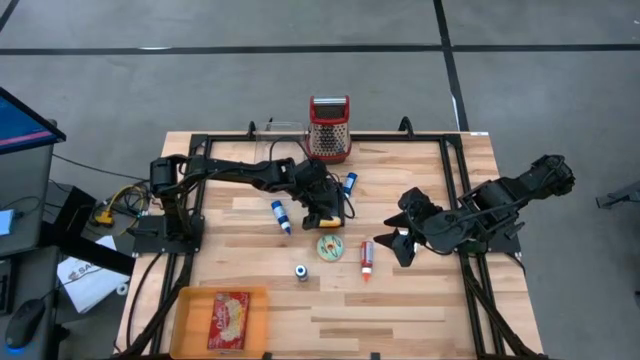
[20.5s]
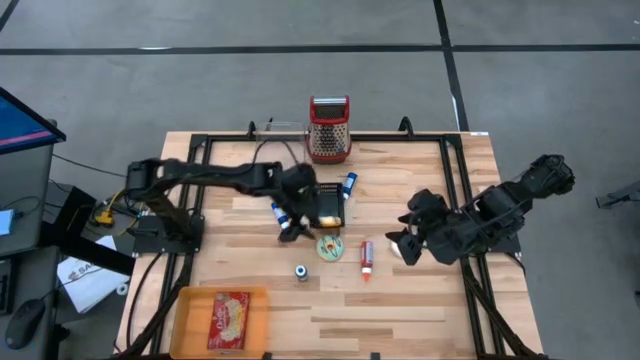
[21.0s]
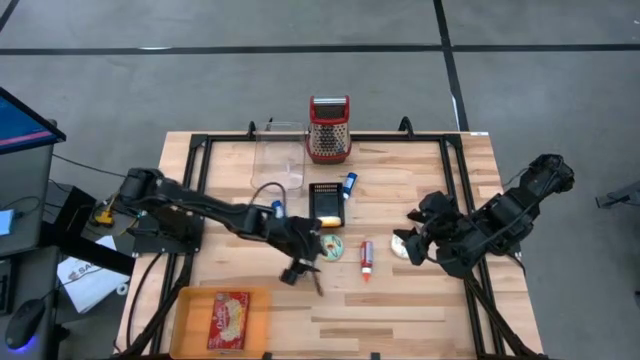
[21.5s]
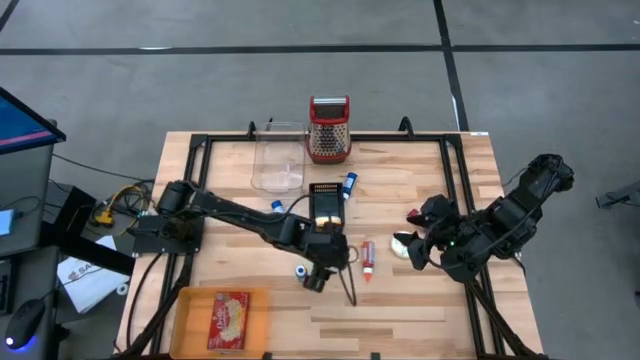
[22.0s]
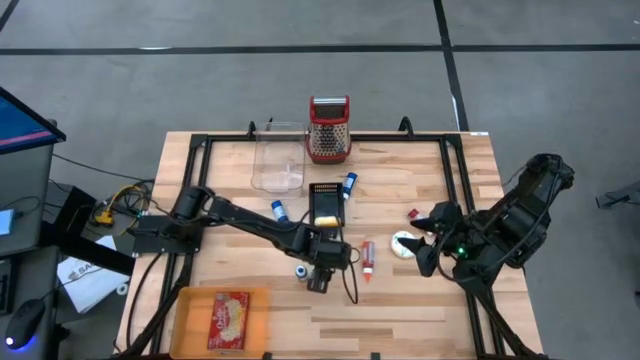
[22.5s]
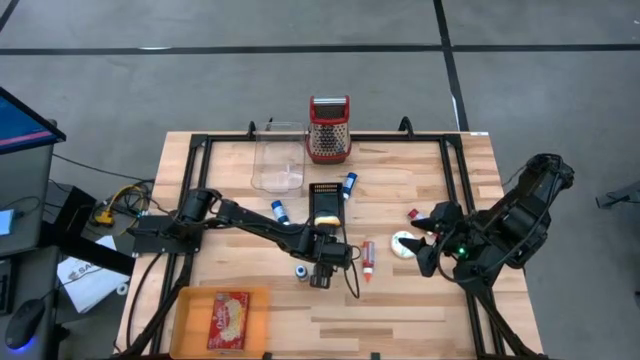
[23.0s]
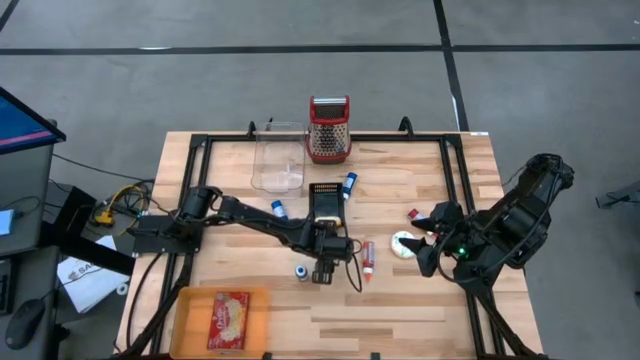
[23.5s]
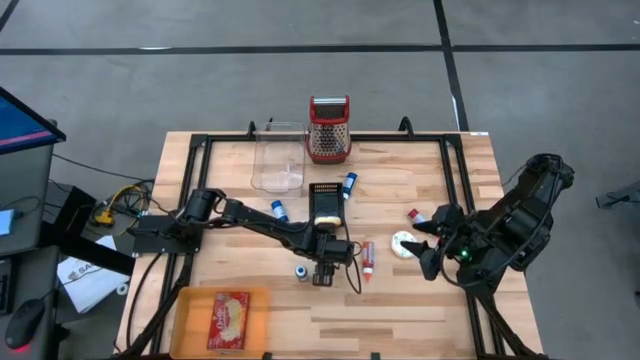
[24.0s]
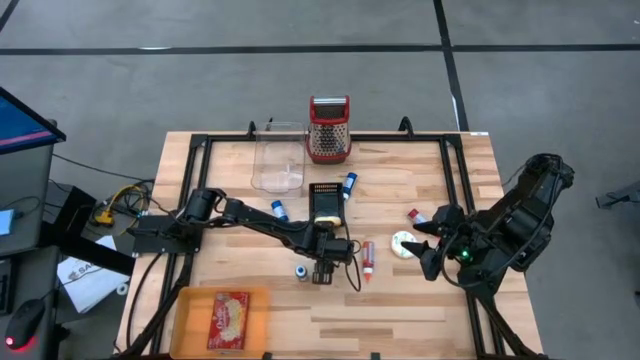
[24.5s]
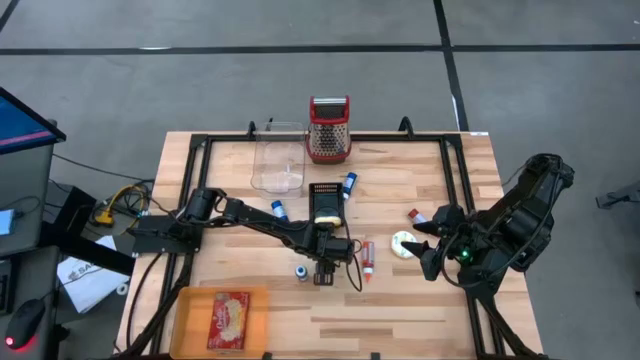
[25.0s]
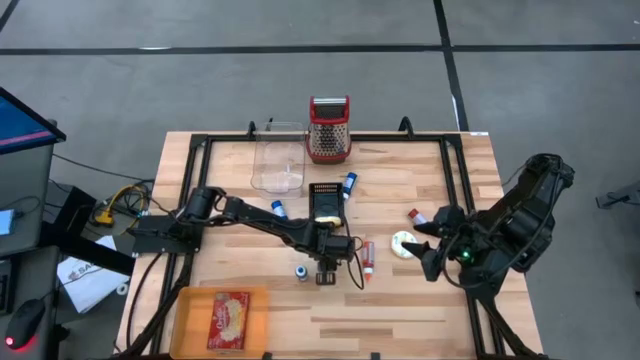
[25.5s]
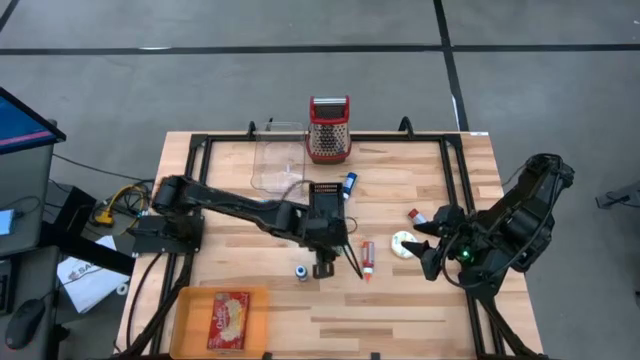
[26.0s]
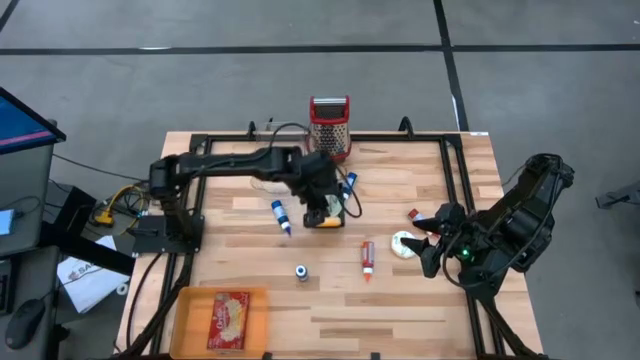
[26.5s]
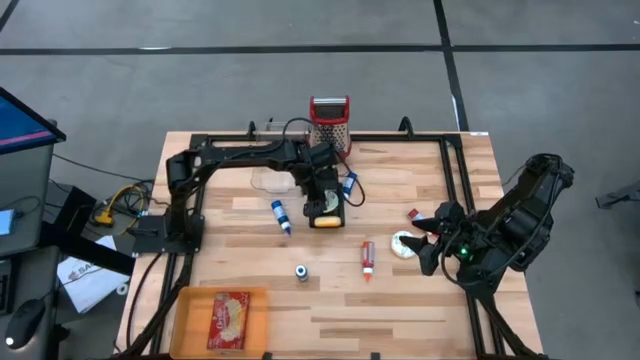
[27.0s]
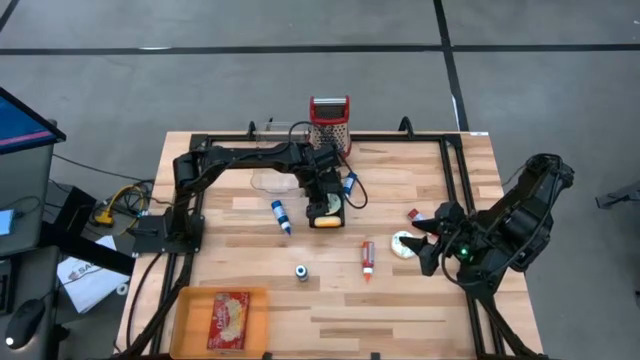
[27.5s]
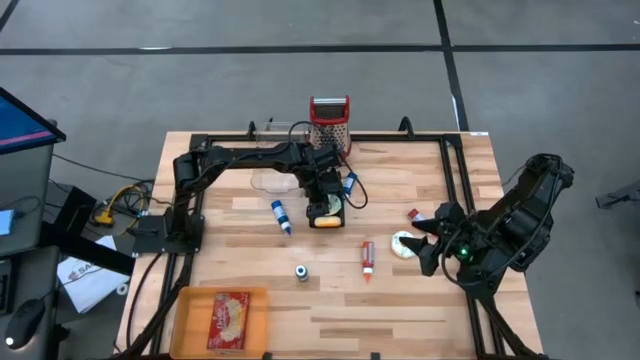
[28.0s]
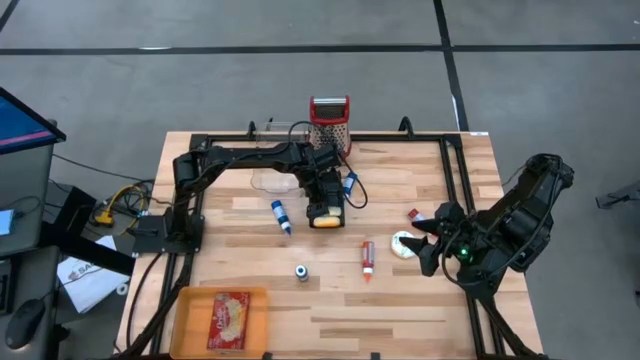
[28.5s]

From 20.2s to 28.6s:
Put the green donut into the black bin

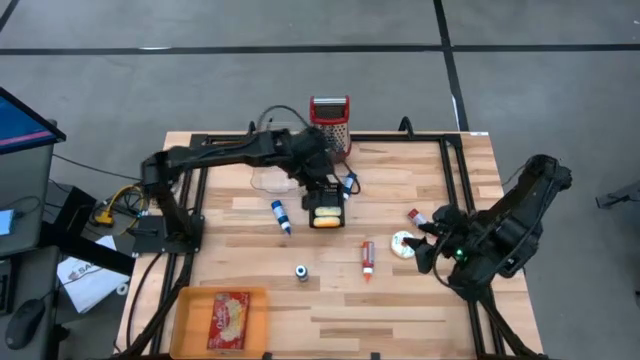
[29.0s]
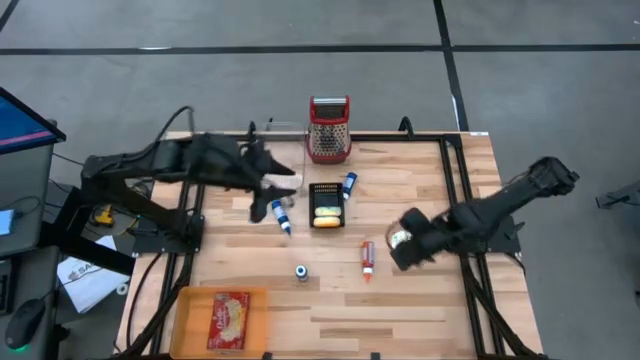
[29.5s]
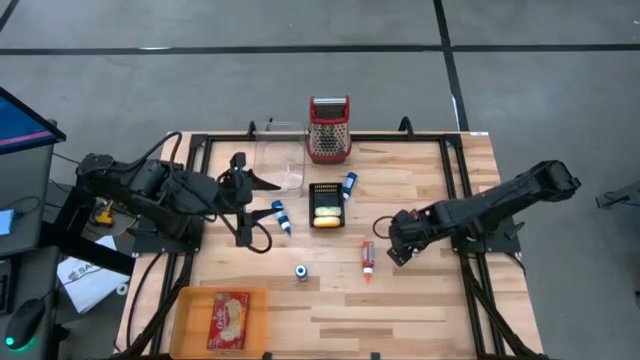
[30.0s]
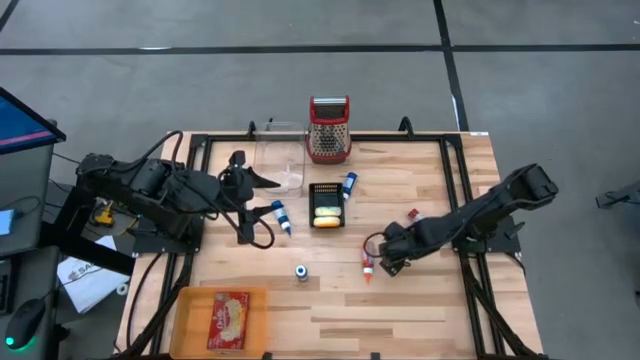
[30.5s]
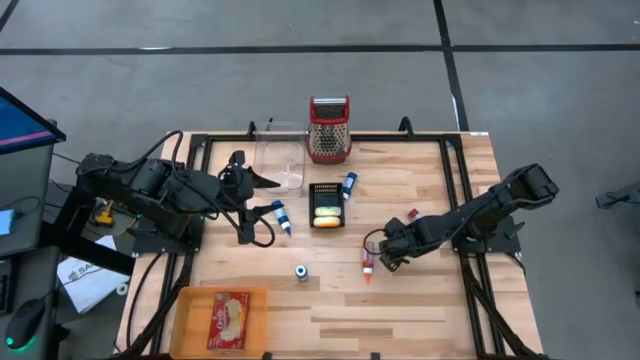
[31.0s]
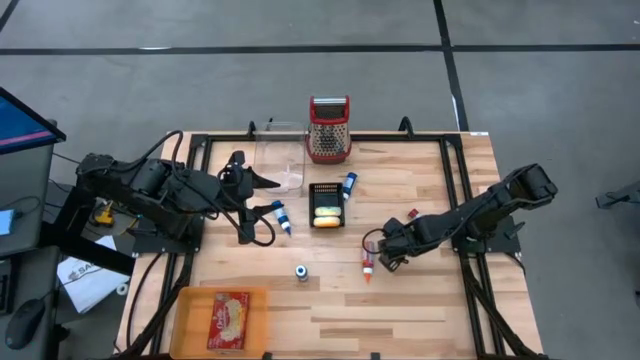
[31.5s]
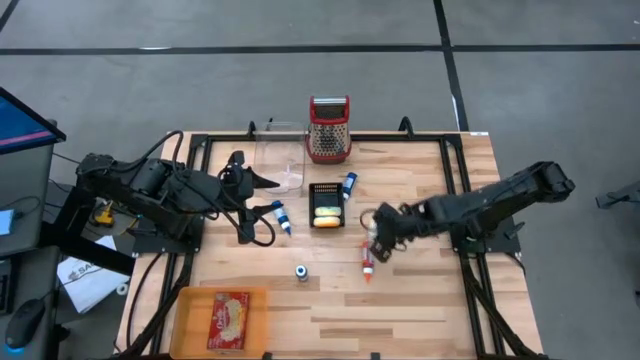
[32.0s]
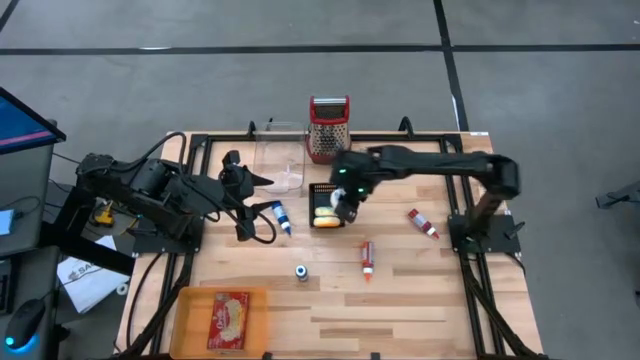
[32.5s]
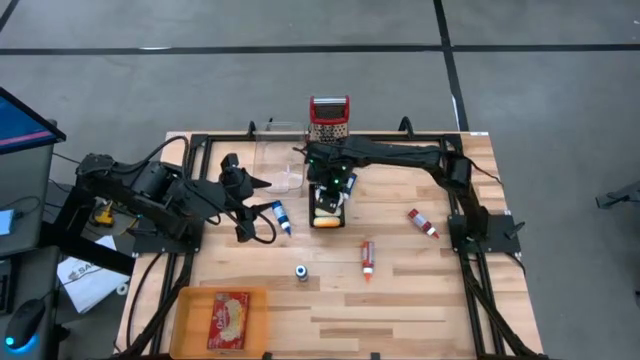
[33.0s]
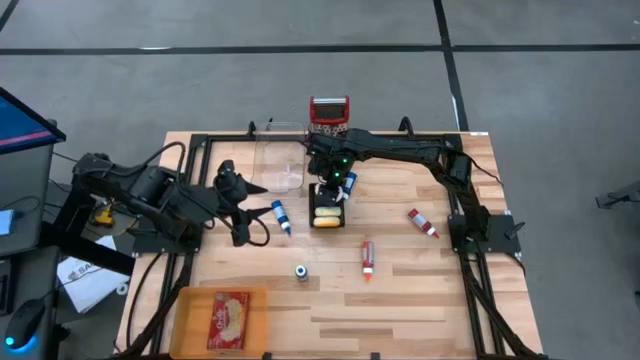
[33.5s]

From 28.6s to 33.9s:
Put the white donut into the black bin

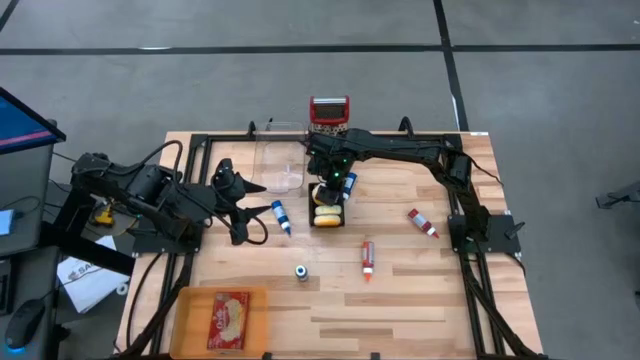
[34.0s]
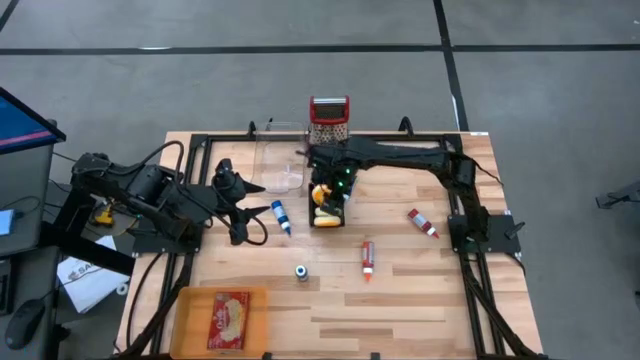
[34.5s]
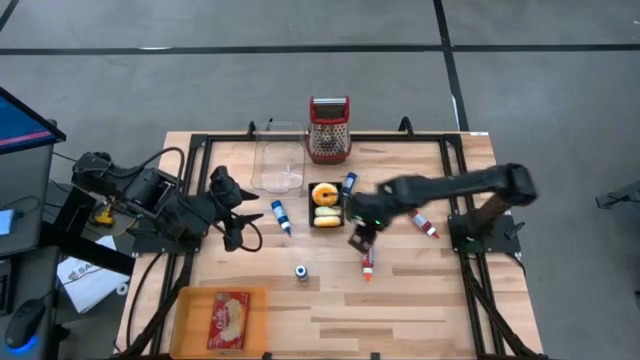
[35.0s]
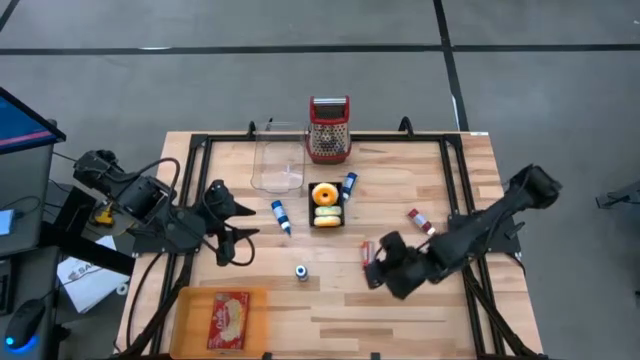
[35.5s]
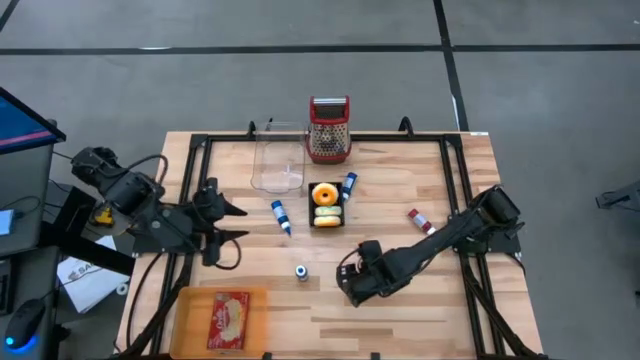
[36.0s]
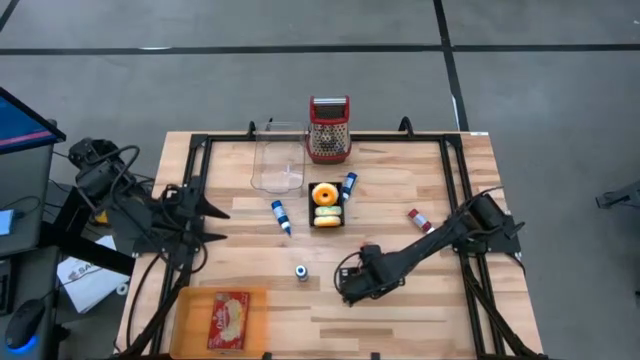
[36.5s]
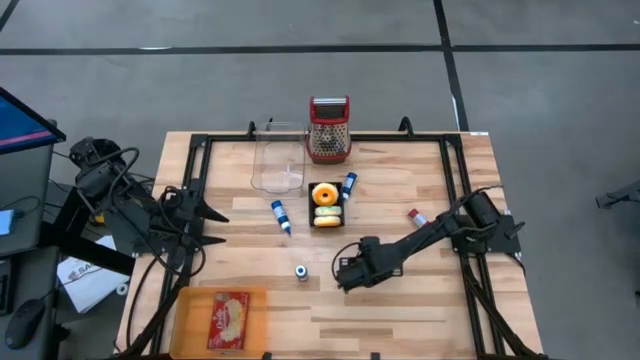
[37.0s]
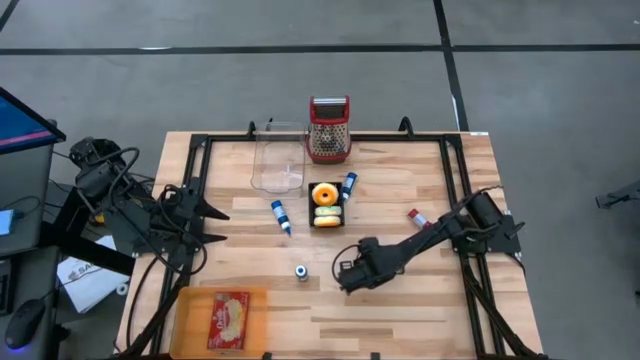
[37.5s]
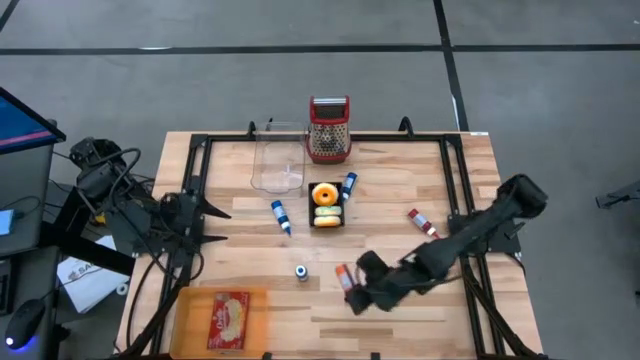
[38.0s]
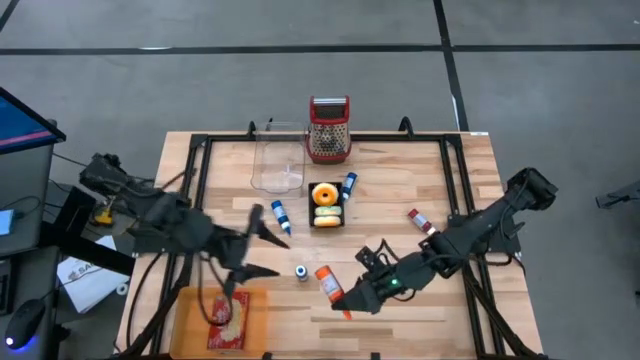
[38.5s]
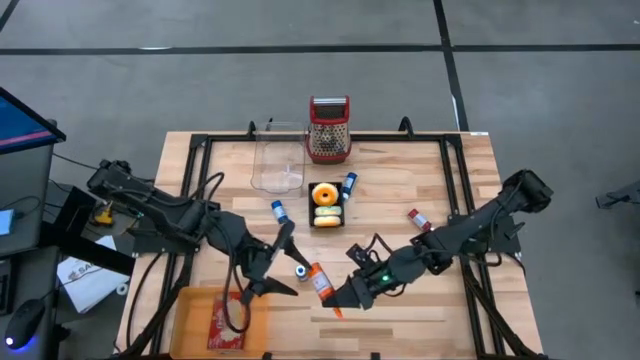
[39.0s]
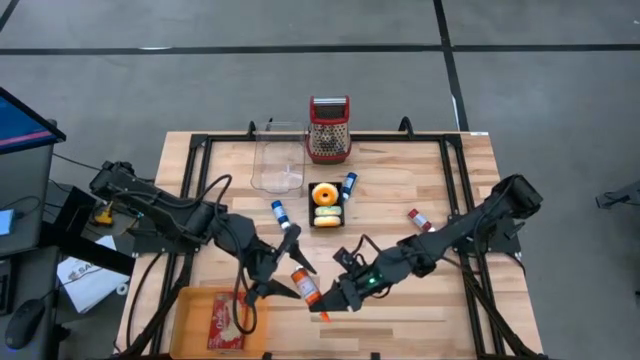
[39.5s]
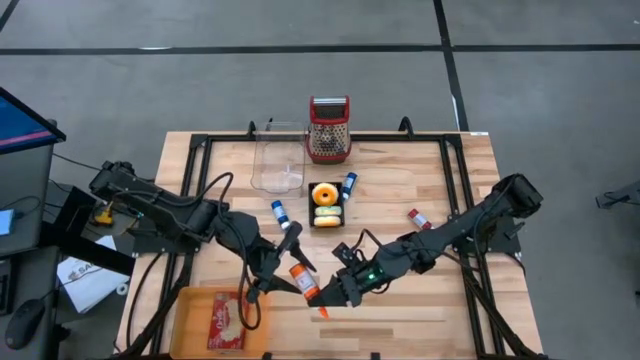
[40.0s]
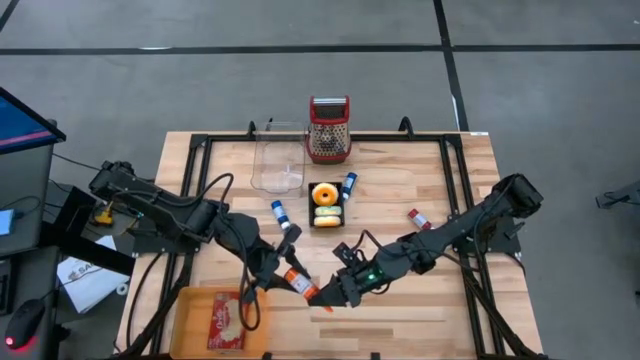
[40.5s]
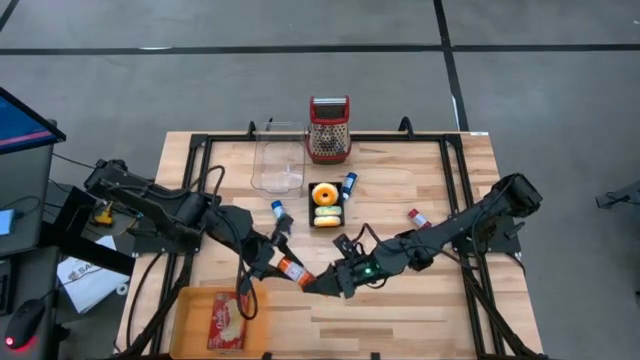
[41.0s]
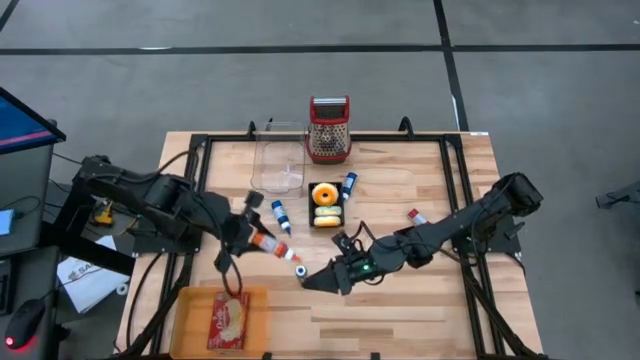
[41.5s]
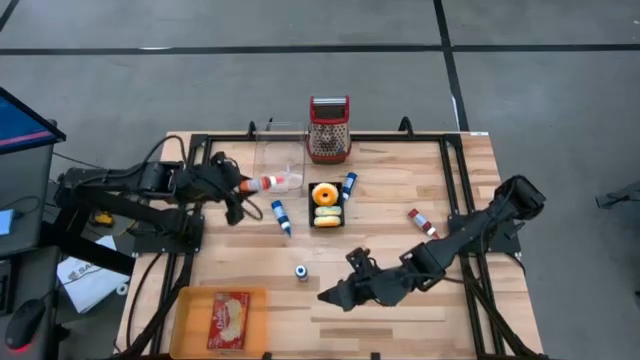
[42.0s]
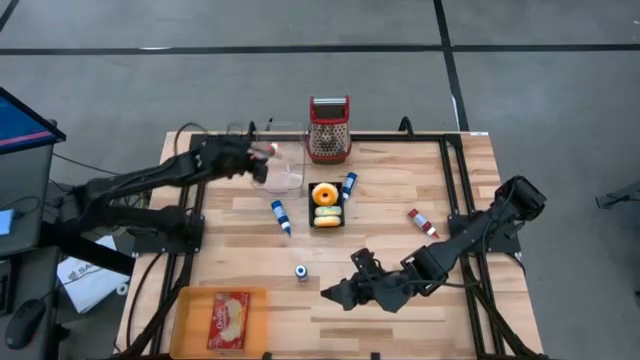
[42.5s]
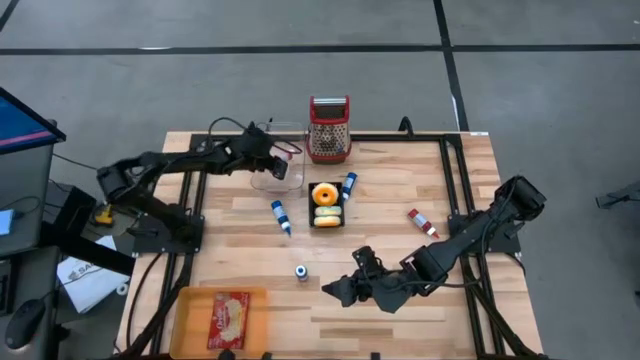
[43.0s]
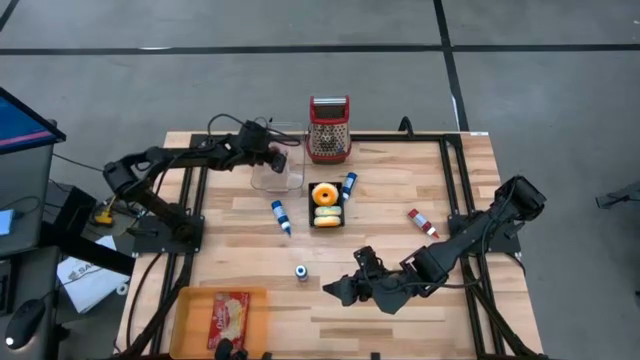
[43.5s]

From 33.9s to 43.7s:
Put the orange food coloring bottle into the transparent bin
